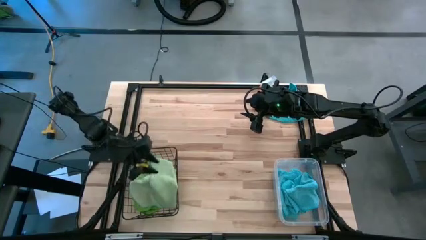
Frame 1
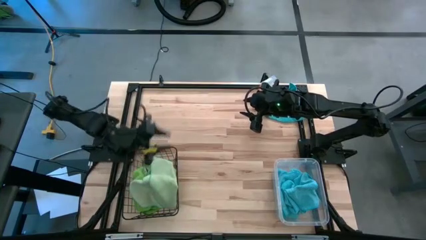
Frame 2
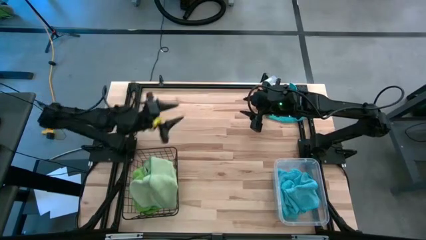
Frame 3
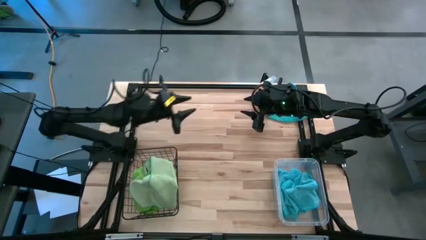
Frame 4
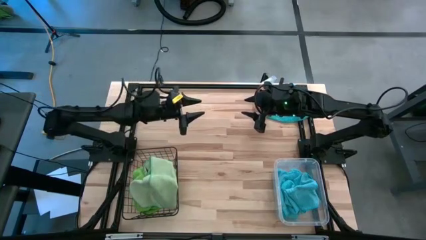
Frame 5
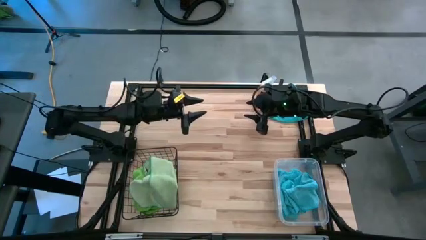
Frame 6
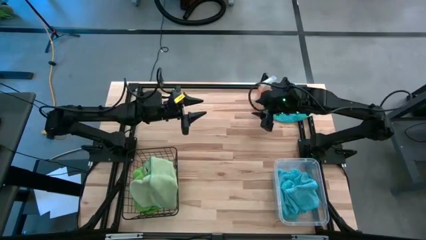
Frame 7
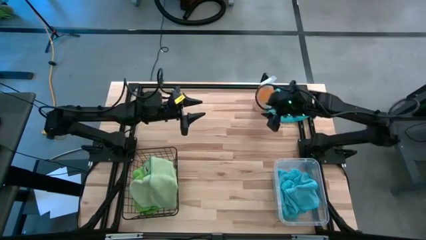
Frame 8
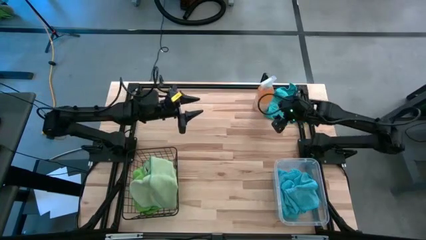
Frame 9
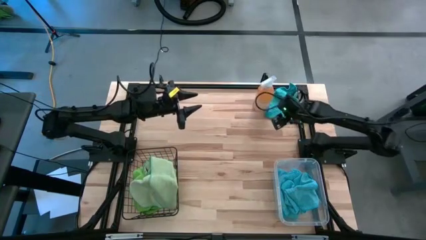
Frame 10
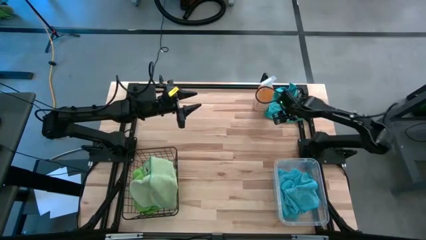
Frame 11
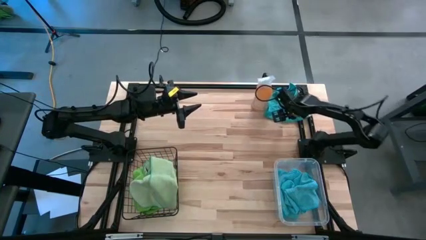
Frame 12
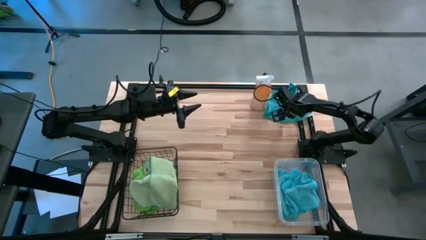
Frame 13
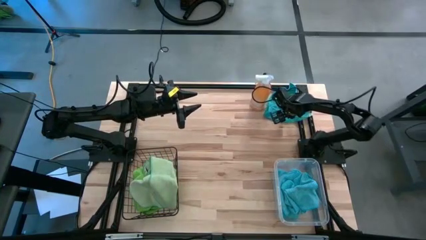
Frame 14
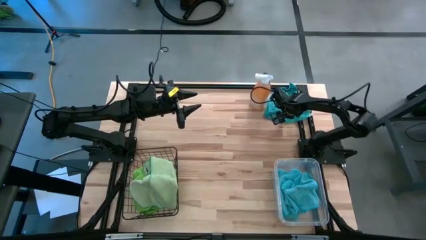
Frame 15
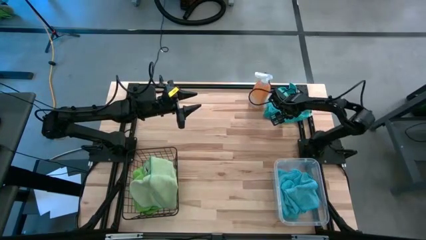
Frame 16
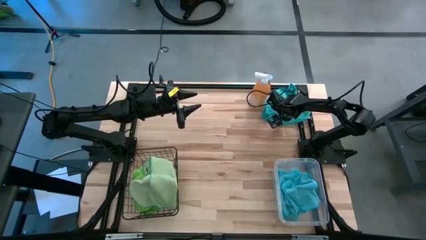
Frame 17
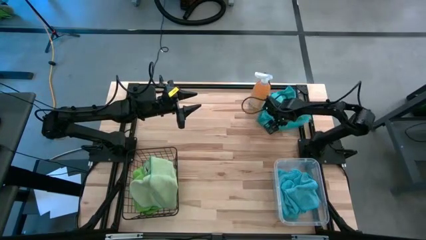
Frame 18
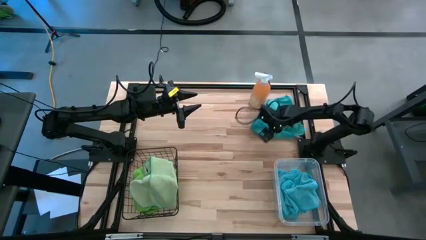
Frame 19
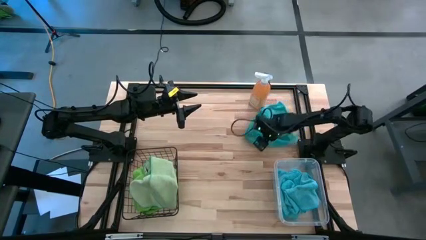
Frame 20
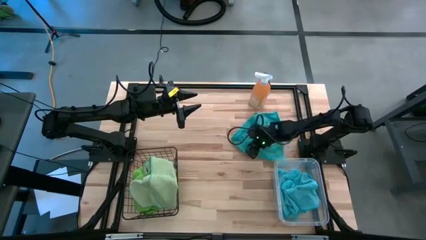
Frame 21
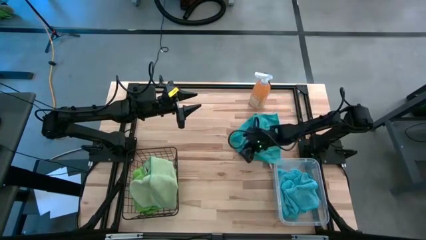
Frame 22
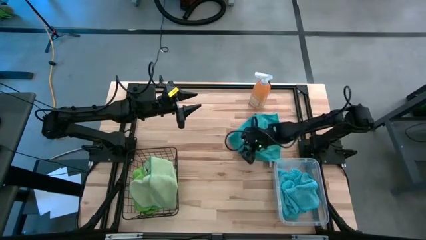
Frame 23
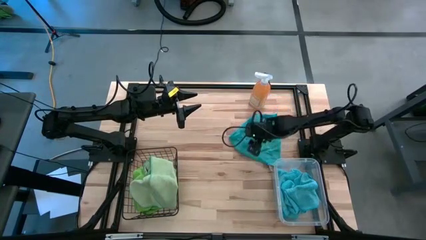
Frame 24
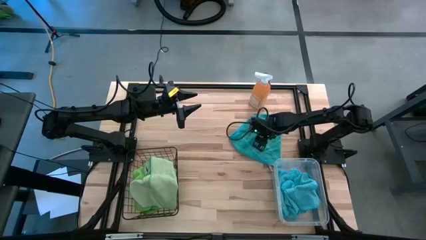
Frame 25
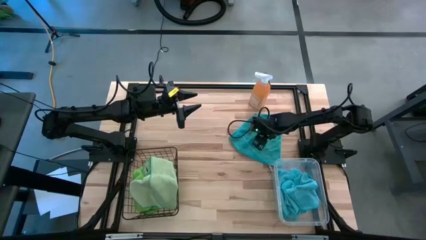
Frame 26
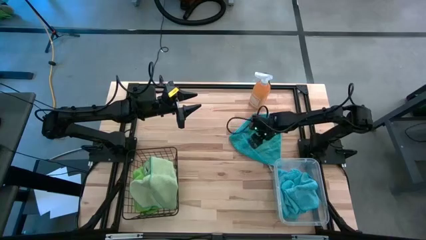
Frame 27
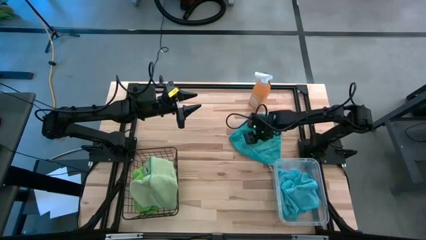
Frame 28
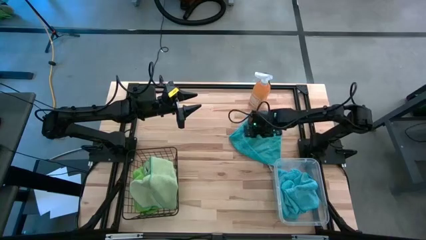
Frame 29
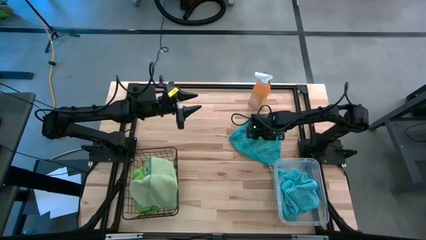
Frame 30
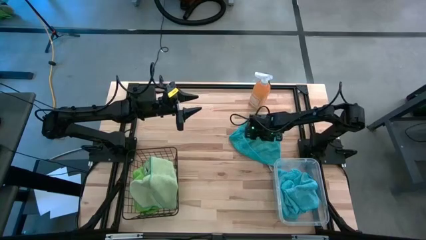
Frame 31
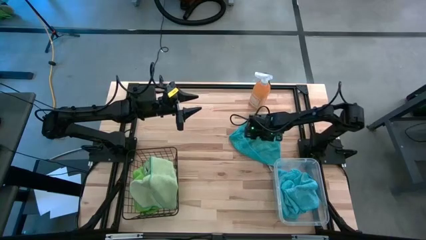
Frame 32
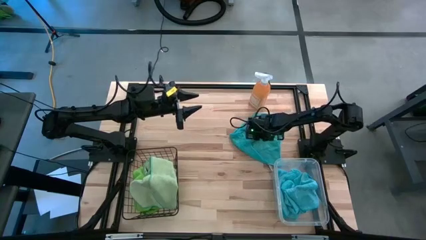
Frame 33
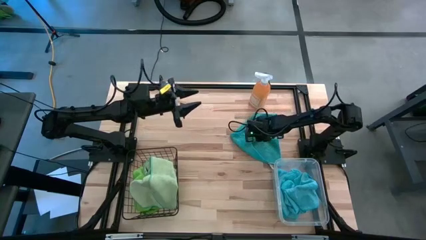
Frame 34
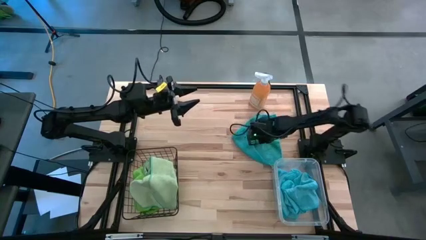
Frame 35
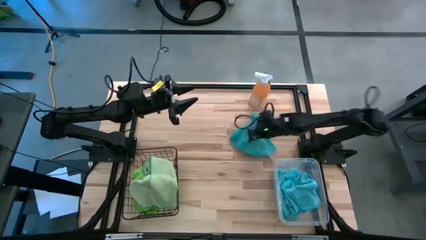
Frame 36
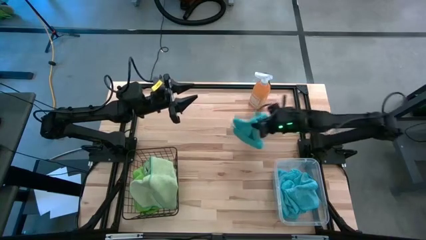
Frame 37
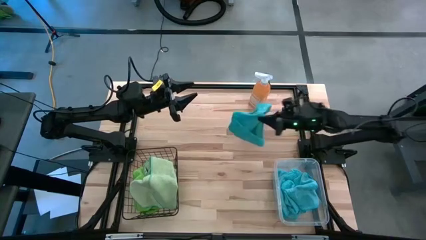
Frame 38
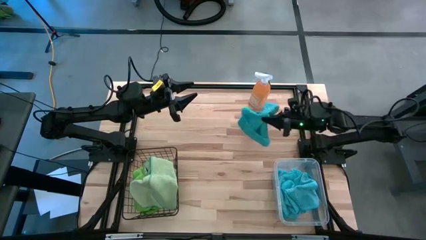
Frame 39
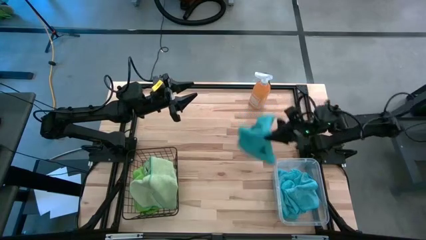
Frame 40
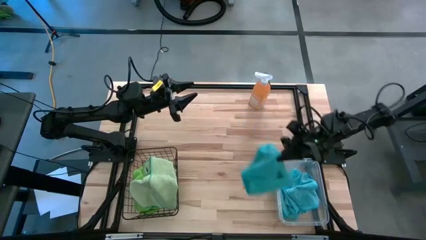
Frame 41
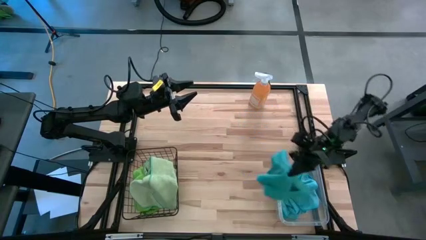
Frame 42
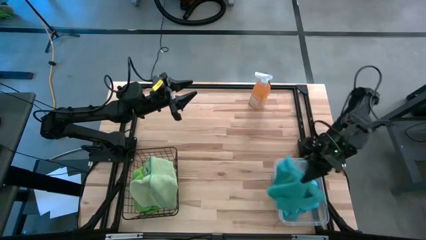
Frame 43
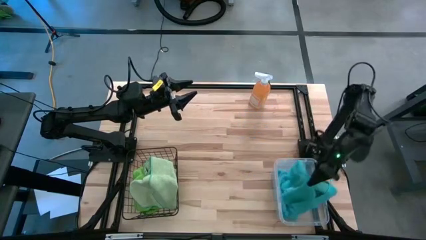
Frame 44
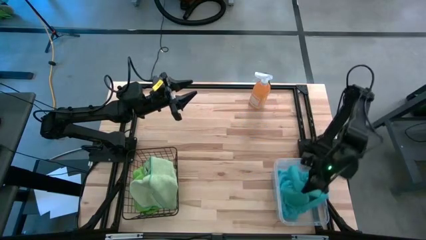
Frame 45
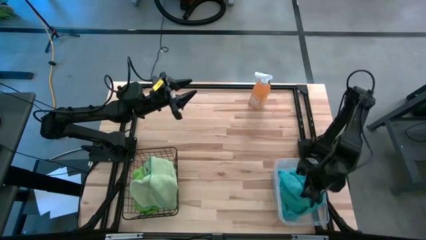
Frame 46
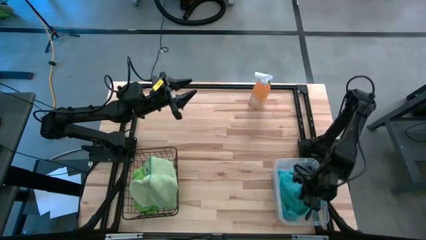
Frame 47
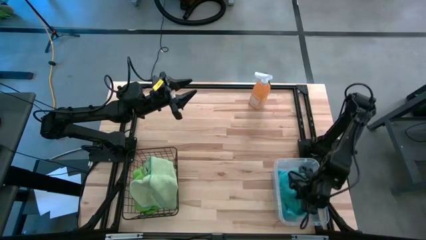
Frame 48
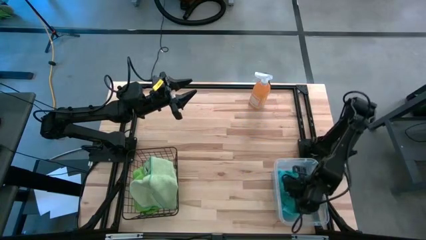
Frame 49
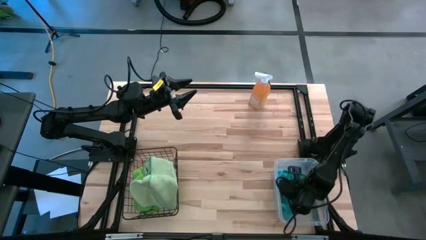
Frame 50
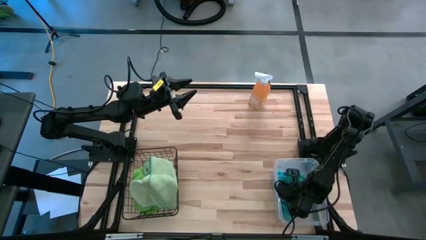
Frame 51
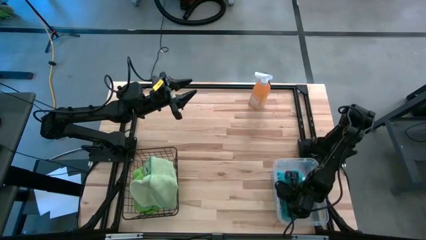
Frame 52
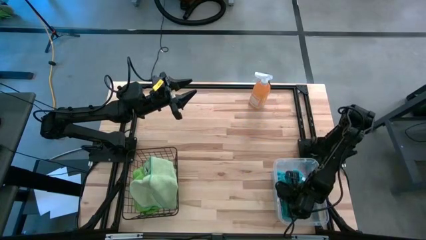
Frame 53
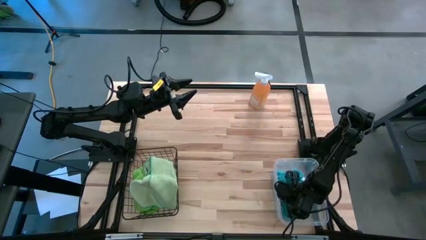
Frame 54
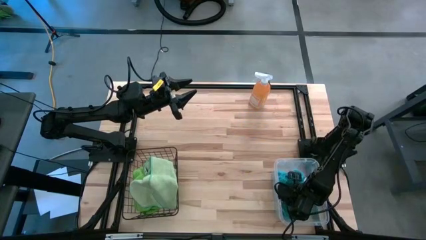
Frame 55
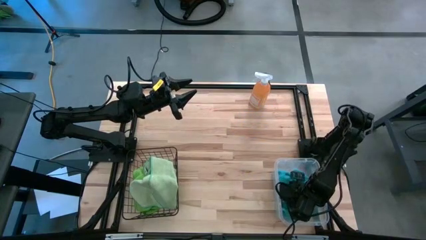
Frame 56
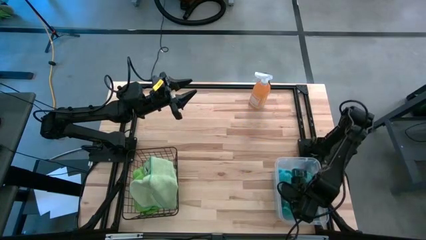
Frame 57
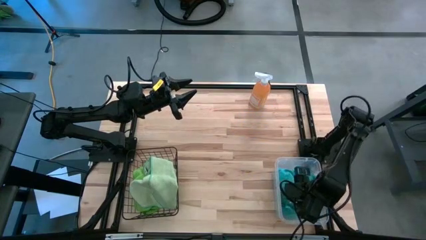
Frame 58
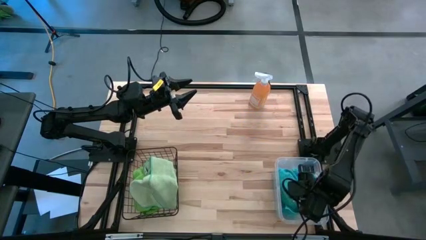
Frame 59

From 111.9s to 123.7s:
Task: Sort microfiber towel by color & place in baskets
Put the blue microfiber cloth into the transparent bin
